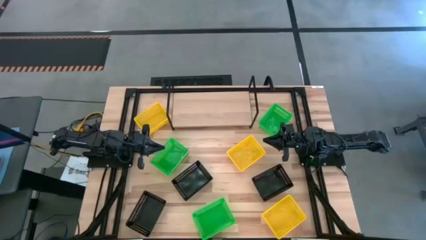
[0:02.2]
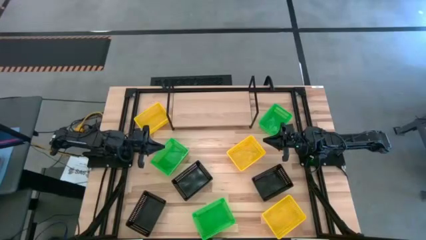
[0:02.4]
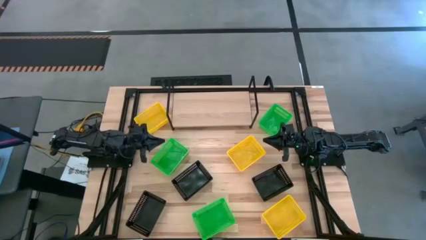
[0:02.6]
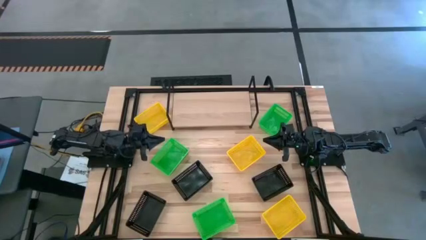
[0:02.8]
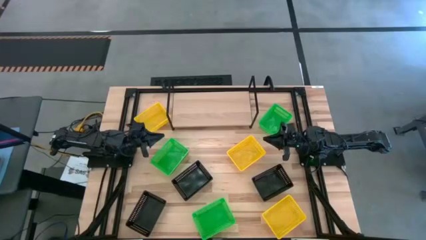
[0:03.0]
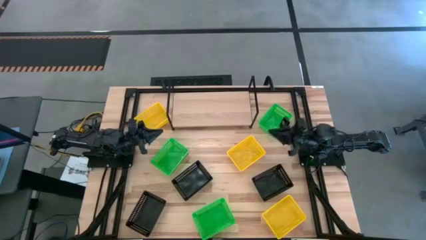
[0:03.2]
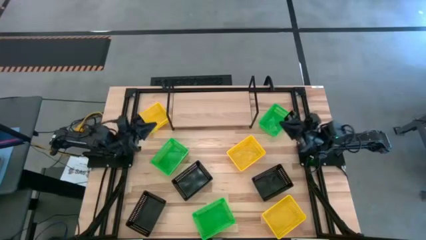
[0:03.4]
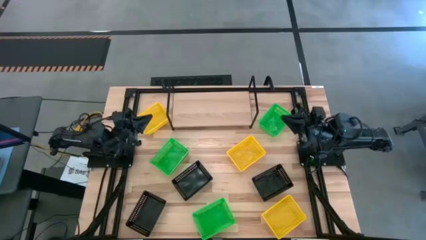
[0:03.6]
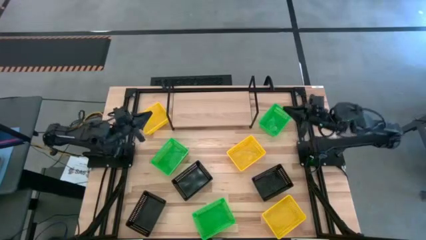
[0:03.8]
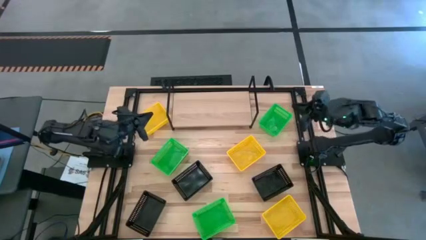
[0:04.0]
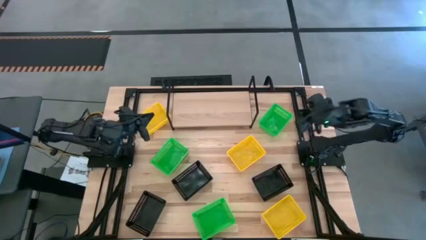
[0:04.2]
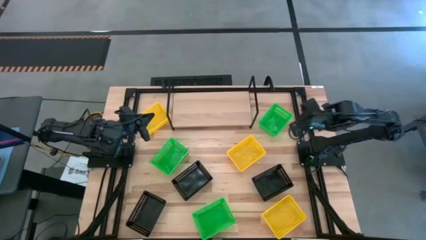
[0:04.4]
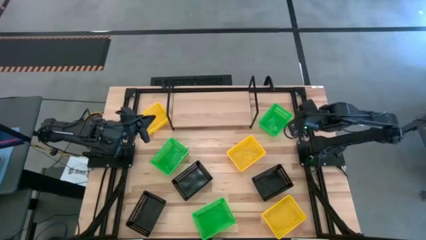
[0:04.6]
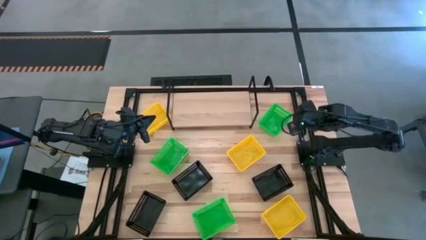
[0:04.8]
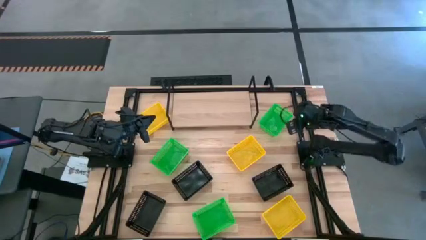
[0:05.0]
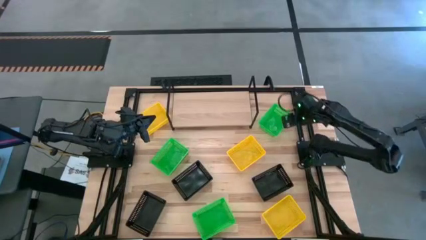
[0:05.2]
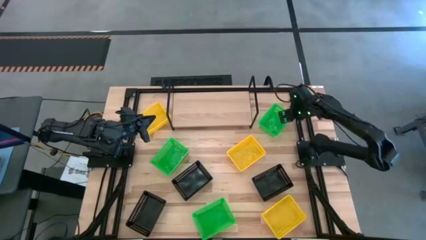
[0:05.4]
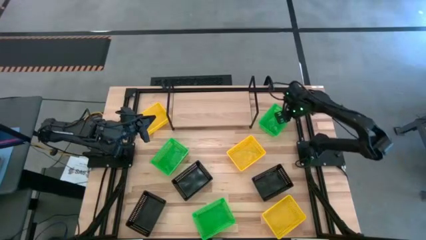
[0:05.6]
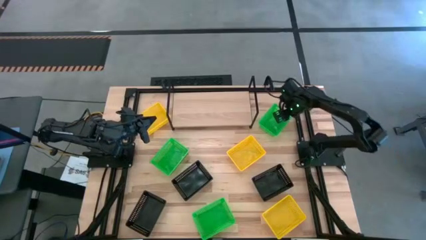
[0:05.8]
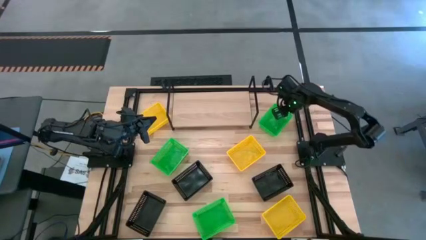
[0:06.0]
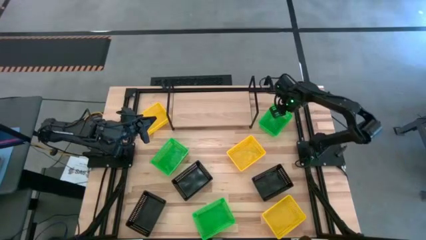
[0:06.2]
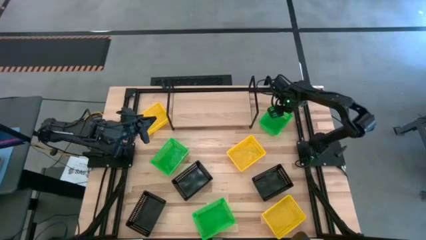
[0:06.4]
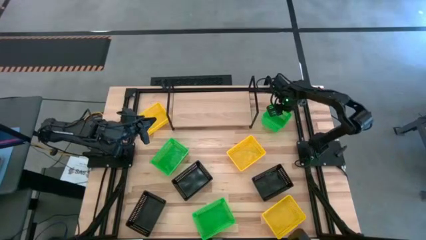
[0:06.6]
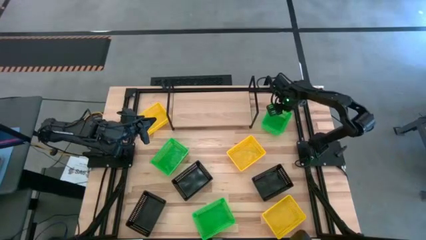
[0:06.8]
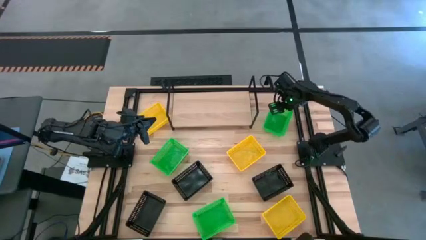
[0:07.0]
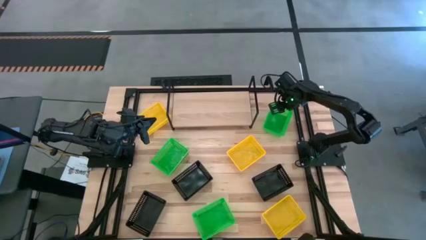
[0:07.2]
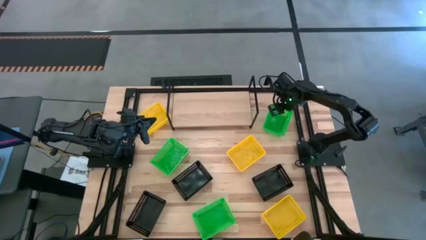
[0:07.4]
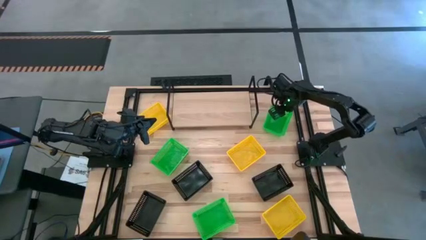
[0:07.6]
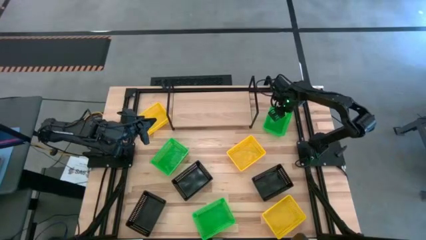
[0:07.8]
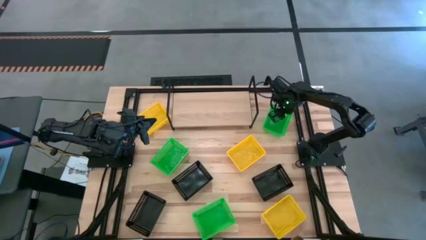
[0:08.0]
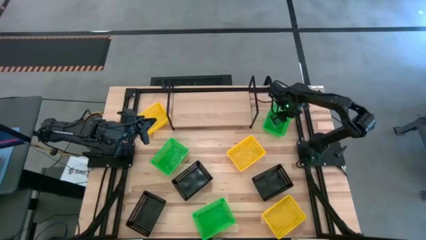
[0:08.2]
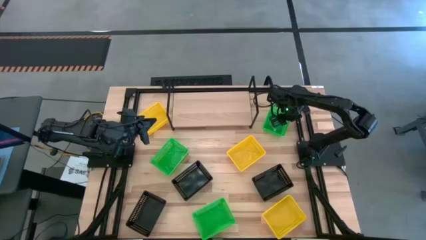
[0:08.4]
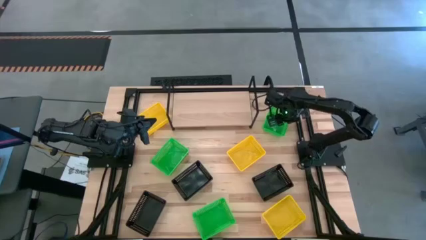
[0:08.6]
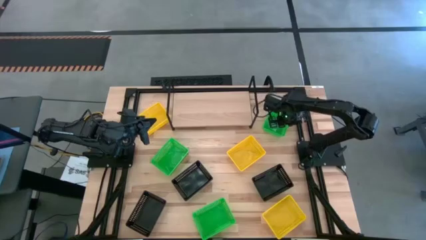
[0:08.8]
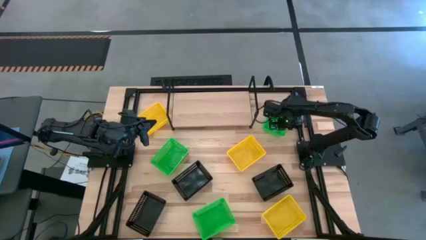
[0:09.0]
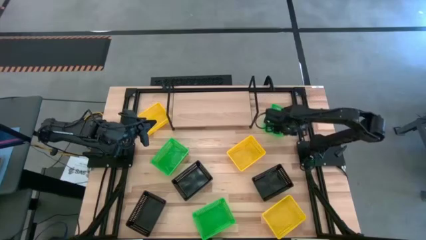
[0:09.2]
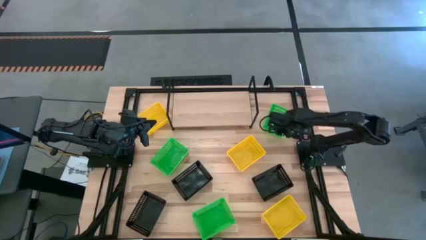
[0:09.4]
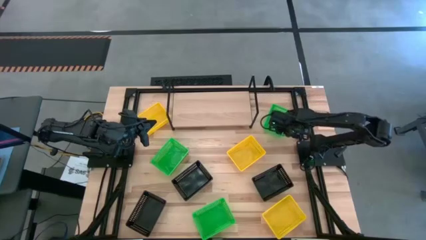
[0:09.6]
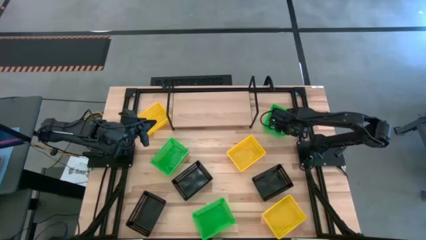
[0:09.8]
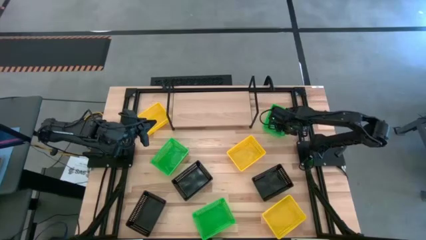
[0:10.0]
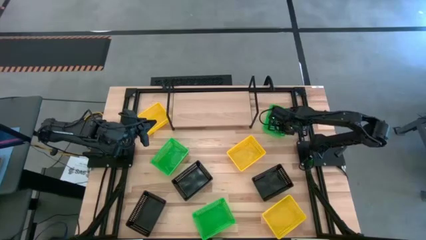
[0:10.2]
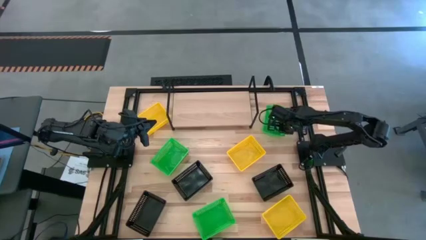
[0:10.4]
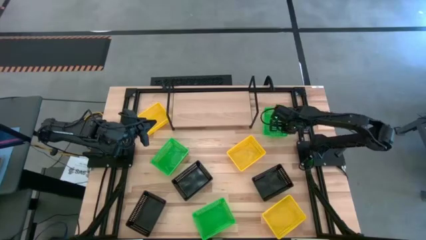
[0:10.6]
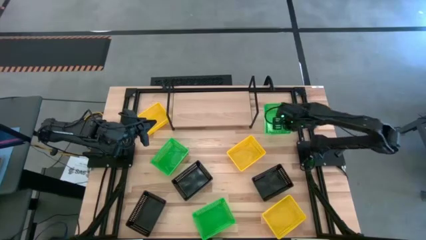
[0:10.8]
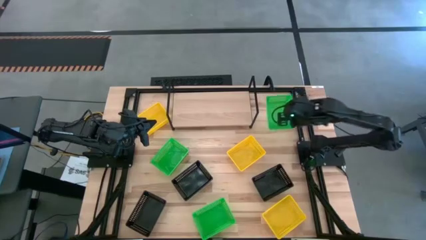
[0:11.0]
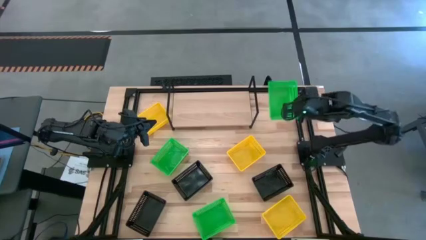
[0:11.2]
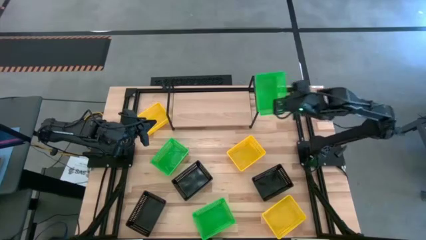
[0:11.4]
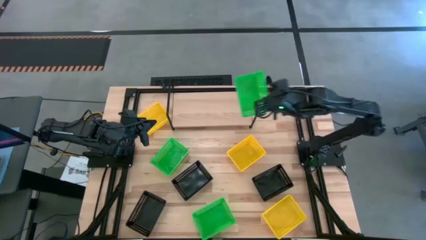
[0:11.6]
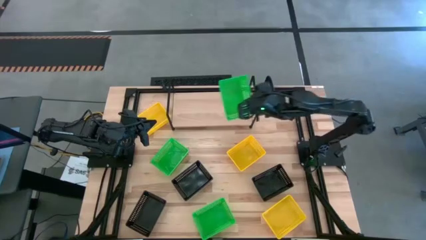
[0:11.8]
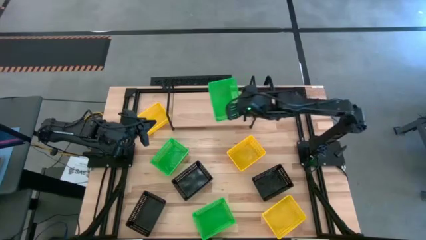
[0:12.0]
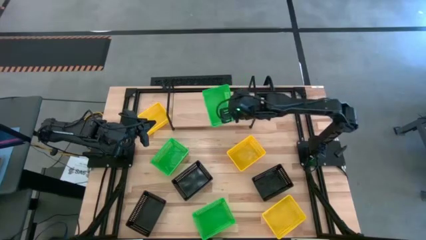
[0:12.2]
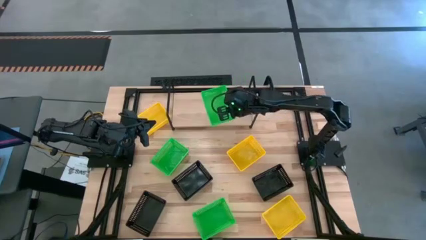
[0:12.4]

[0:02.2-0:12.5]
Task: Stack baskets on shelf by color
Put the top right green bin on the shelf

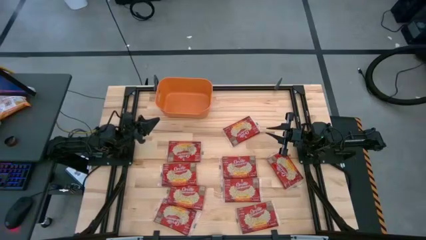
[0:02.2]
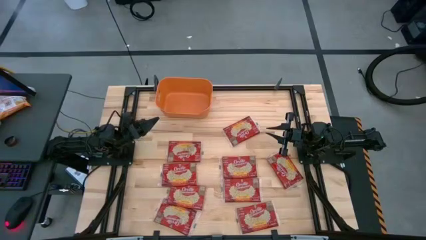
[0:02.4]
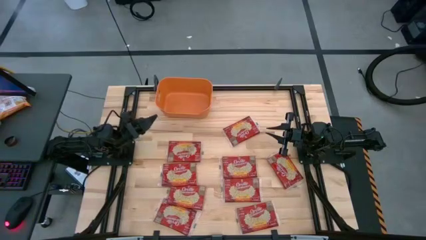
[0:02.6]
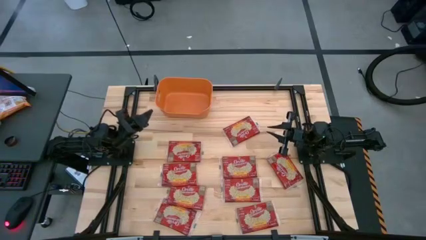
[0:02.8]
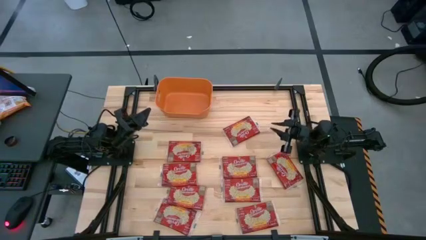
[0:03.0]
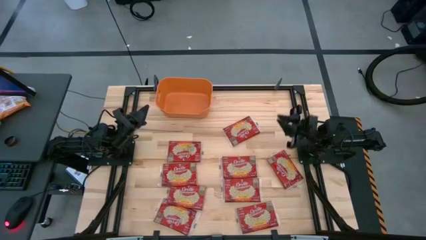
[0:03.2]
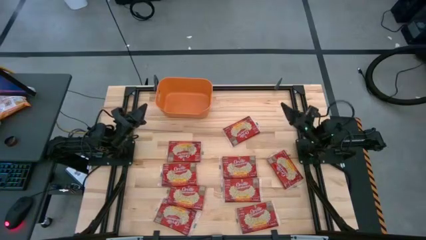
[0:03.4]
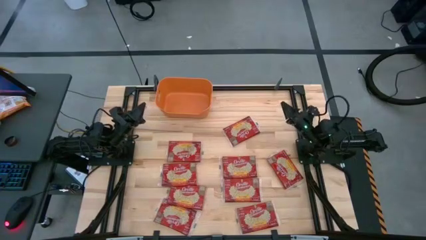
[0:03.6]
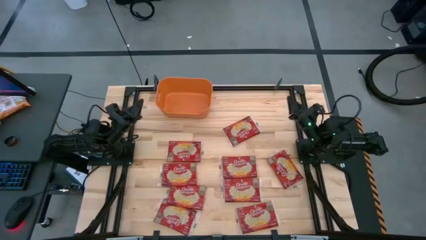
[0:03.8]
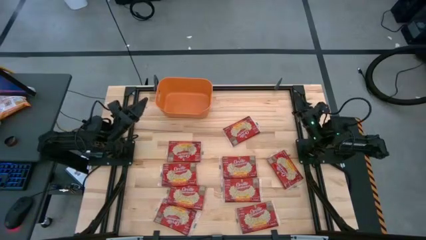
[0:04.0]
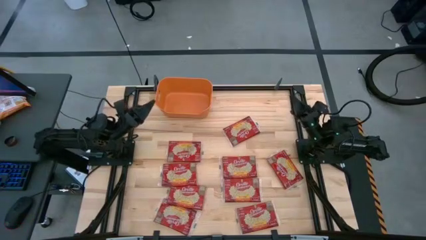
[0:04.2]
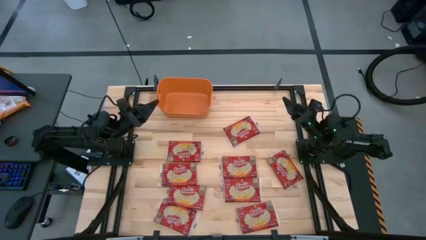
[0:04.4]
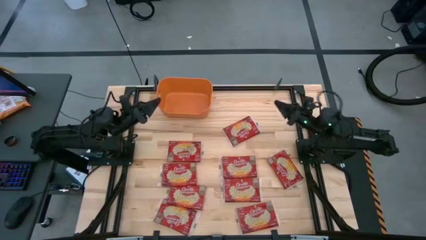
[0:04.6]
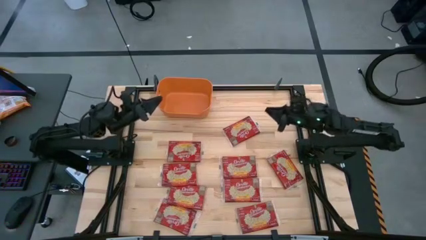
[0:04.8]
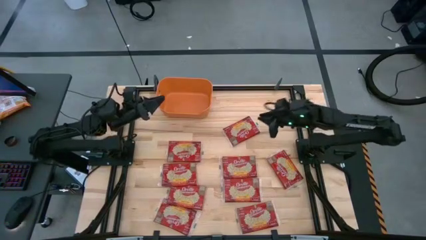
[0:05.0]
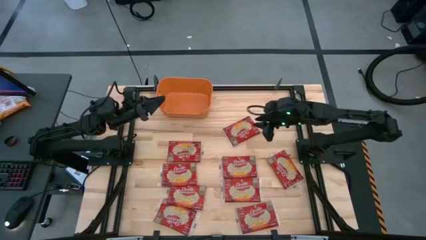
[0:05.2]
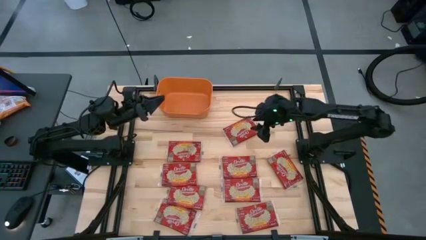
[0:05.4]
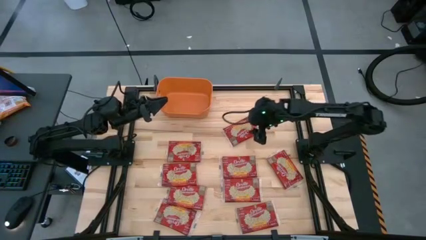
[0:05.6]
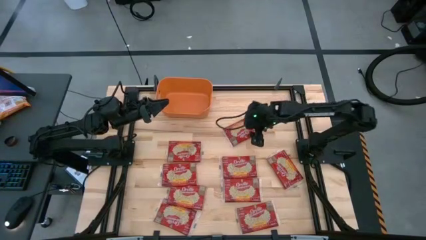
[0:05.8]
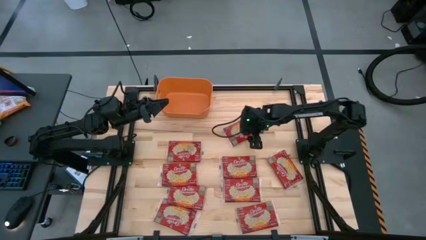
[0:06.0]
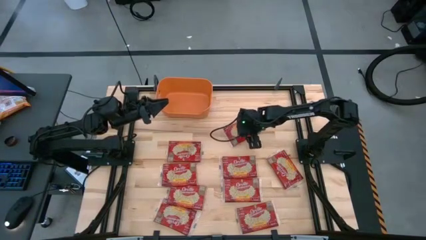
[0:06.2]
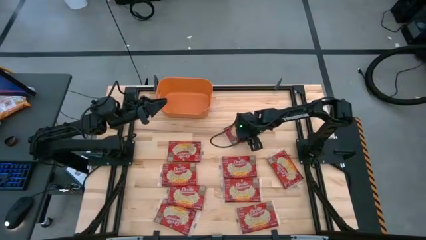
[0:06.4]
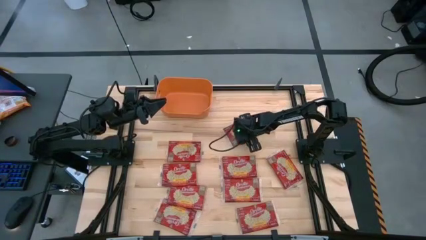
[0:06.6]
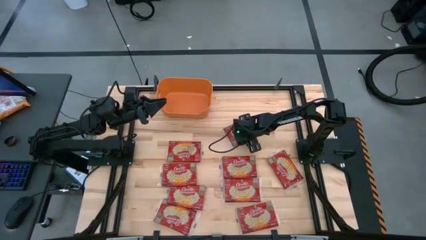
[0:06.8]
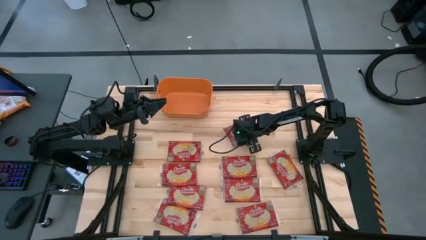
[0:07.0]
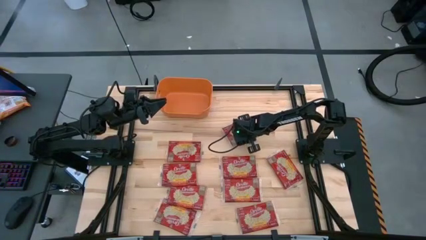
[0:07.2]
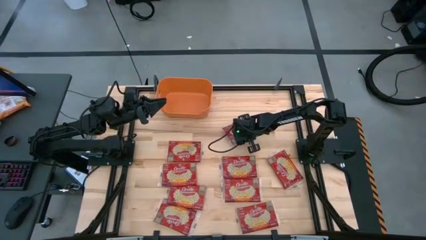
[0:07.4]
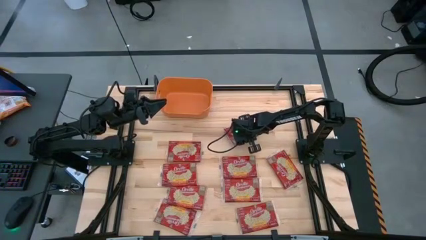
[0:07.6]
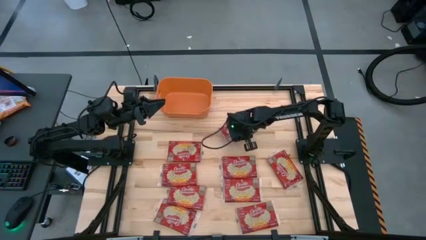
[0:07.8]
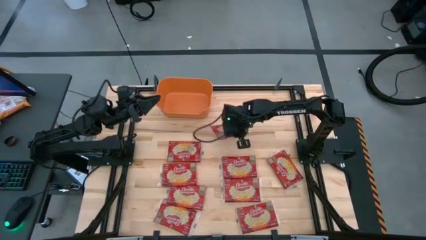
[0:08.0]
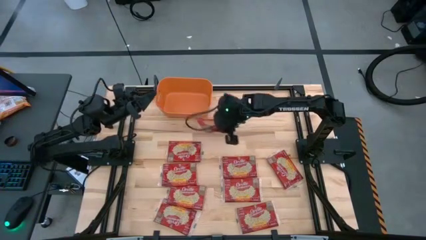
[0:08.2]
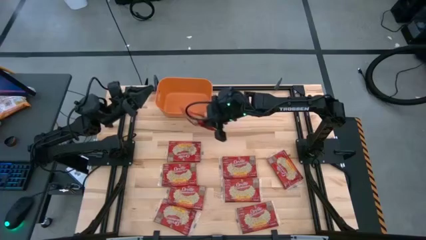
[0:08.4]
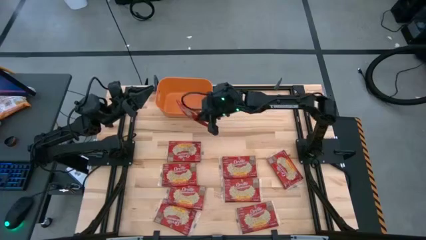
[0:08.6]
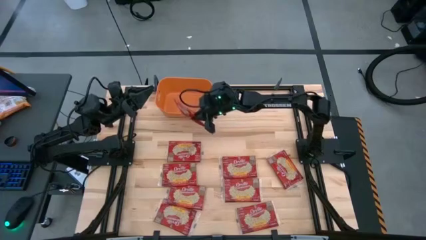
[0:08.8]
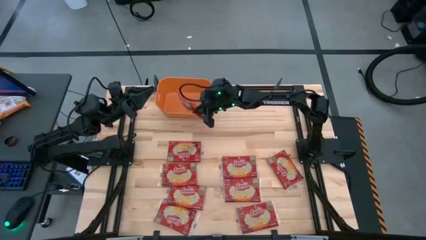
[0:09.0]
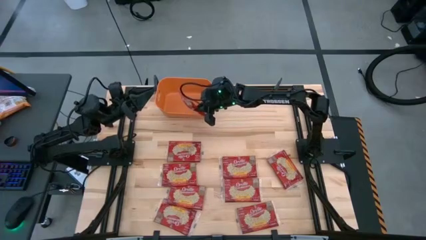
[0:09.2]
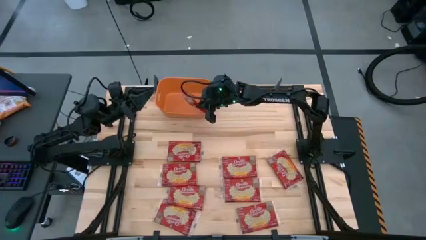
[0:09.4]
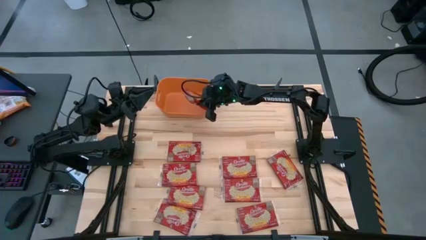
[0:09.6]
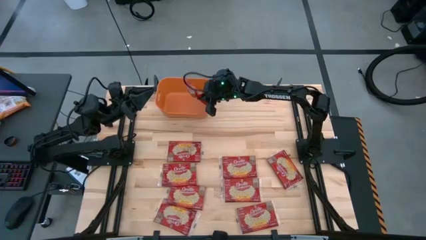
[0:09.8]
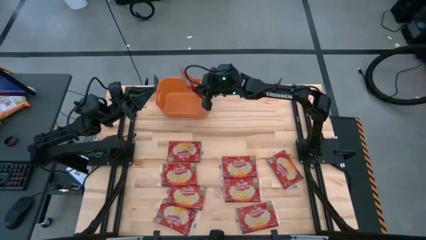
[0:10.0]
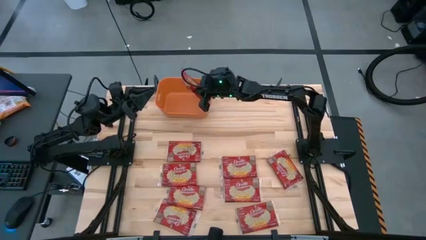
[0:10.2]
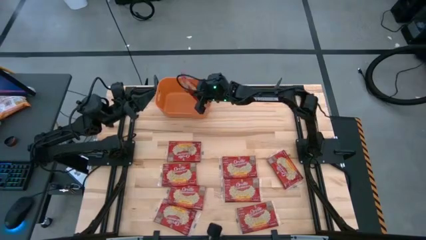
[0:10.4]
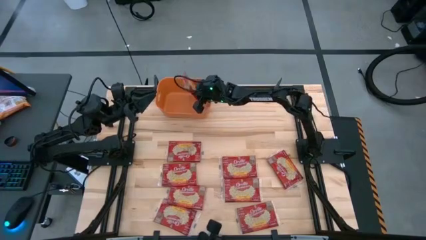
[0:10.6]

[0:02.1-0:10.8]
Task: Sort popcorn bags into baskets
Put the red popcorn bag into the orange bin
